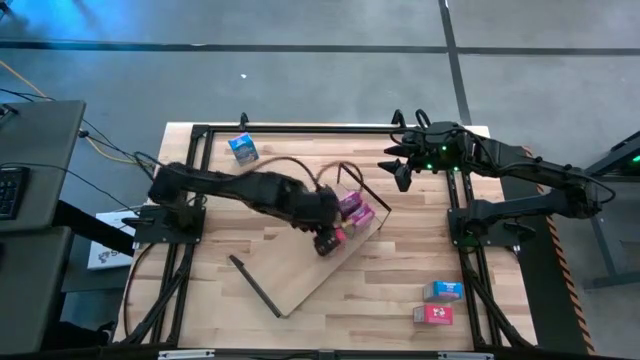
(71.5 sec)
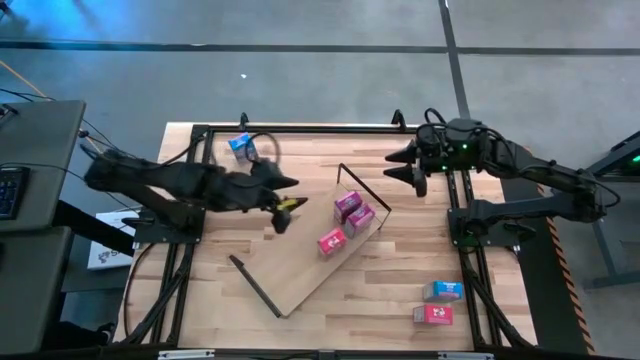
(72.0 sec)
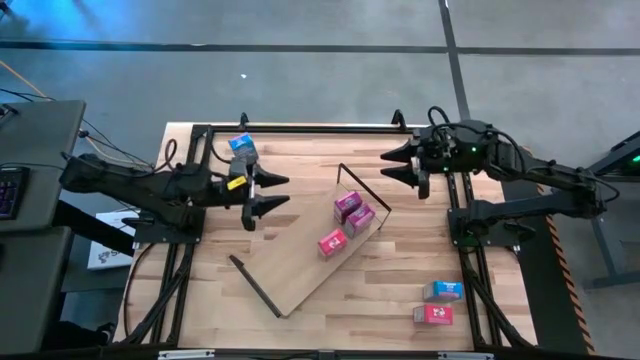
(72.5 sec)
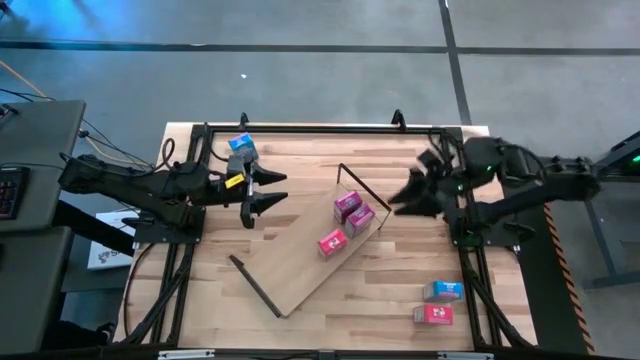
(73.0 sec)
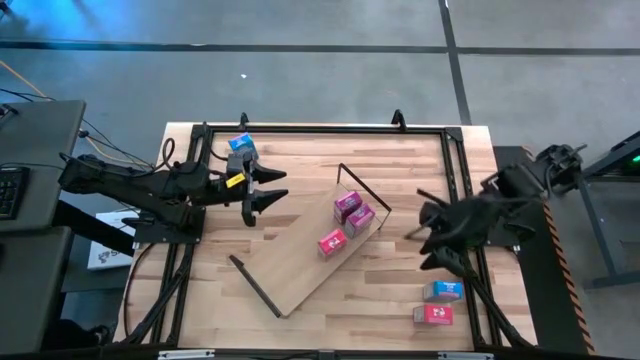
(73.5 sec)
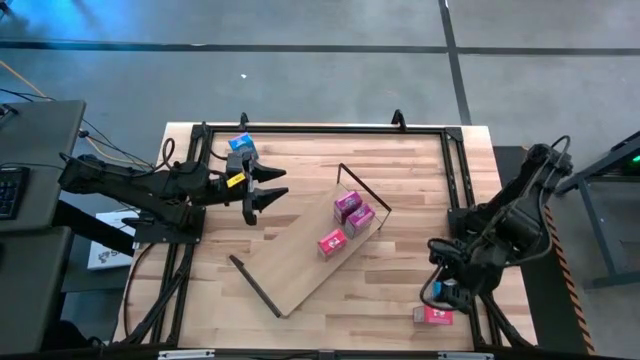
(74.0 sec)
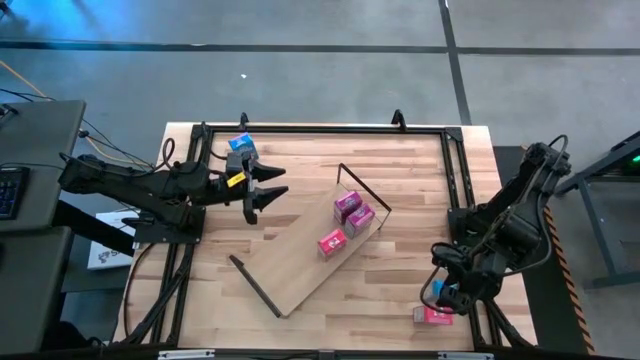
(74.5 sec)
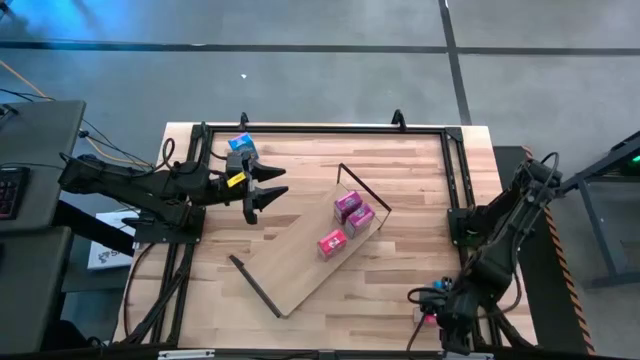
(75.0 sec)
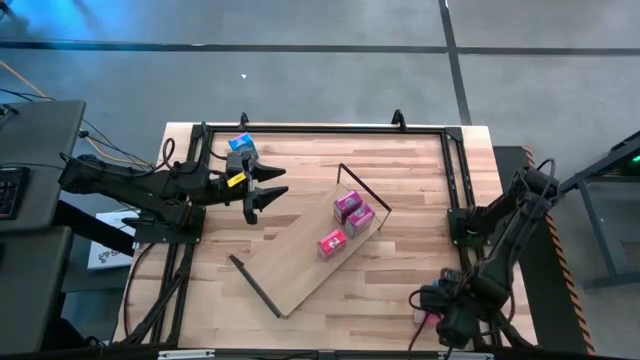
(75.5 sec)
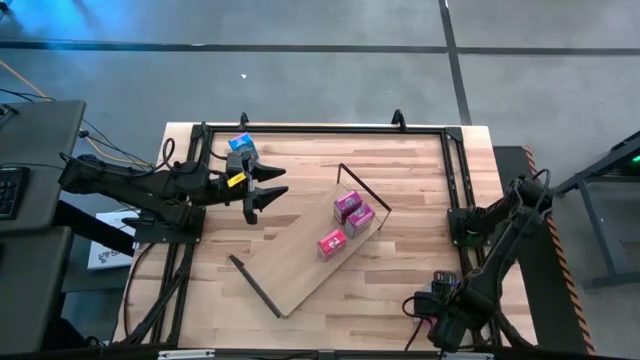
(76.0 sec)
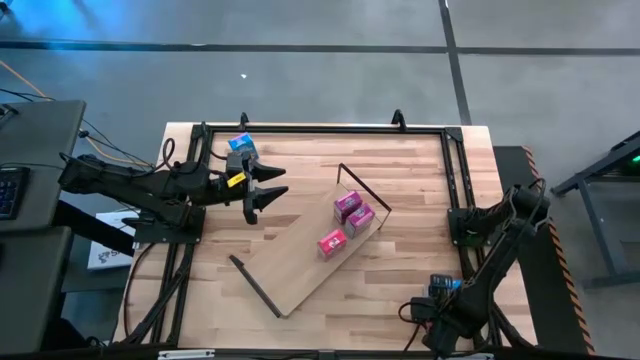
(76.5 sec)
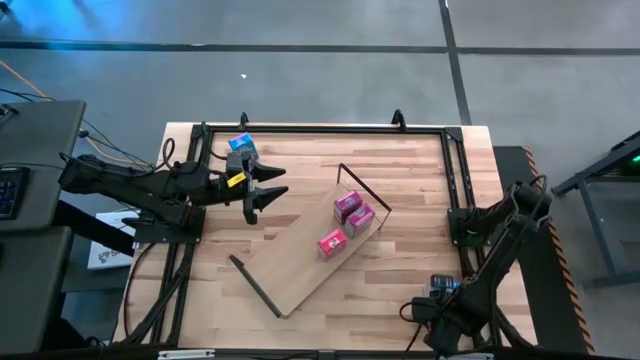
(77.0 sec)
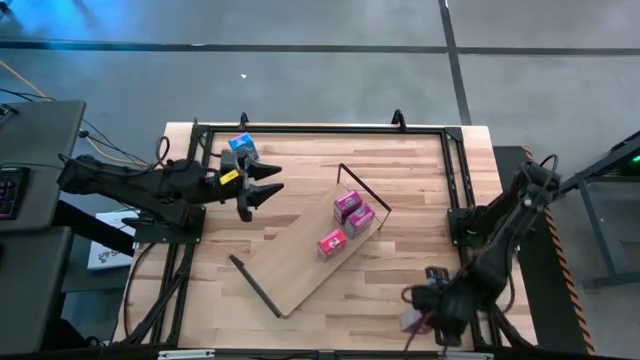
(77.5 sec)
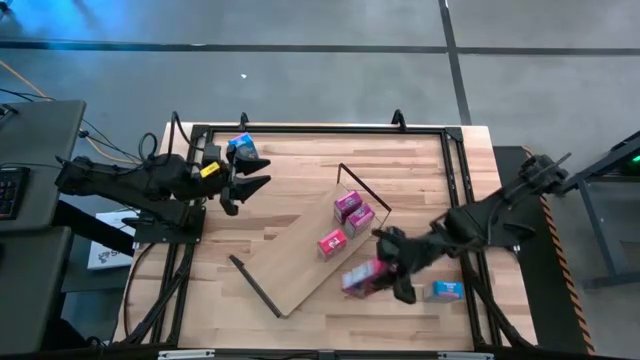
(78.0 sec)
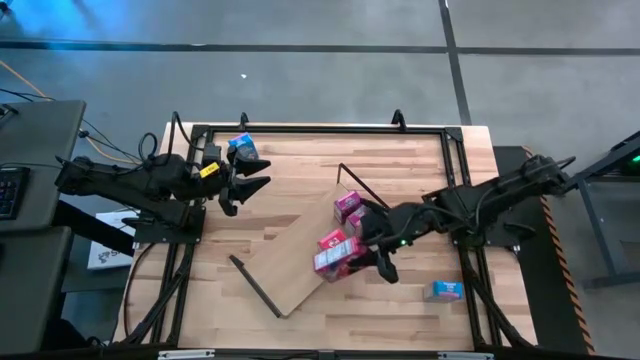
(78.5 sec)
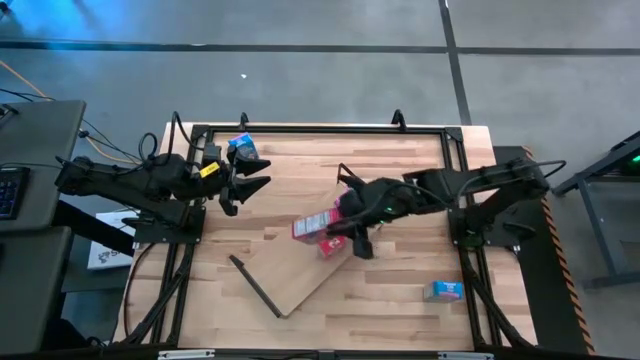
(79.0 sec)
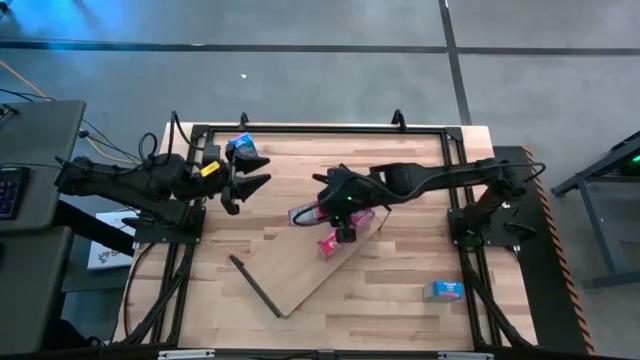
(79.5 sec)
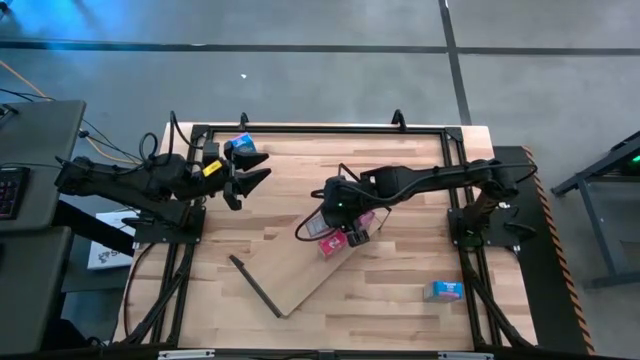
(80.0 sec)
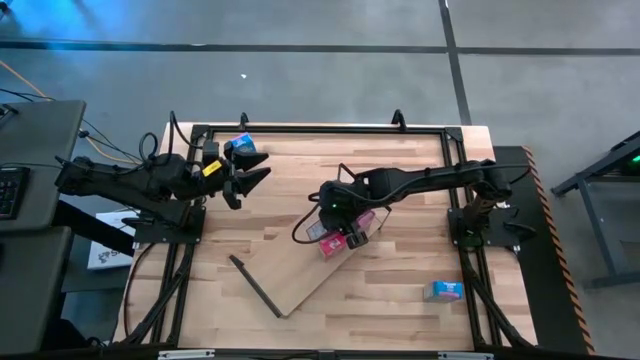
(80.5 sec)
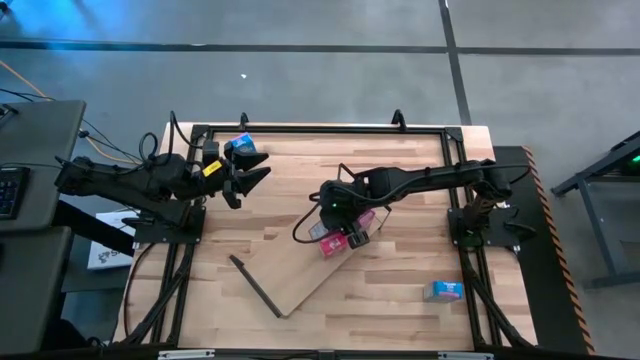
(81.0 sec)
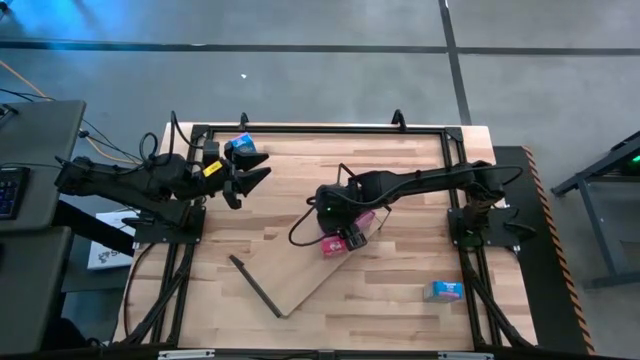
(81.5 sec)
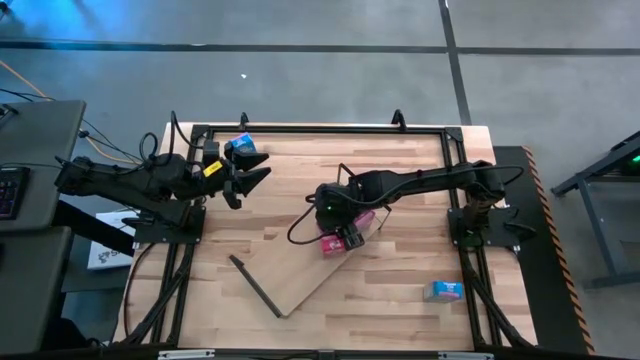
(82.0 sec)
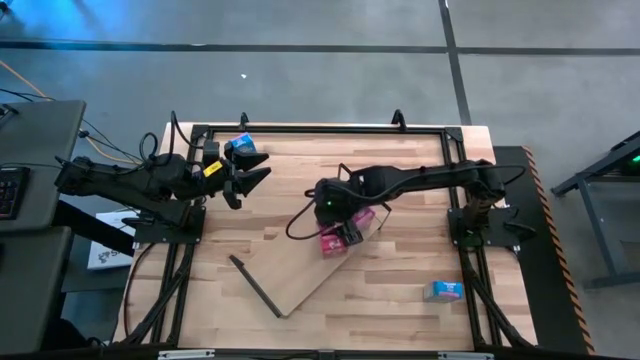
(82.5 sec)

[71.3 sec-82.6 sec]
Task: Stack cereal on shelf
Put the red cereal box on the shelf aligned with the other red cereal box

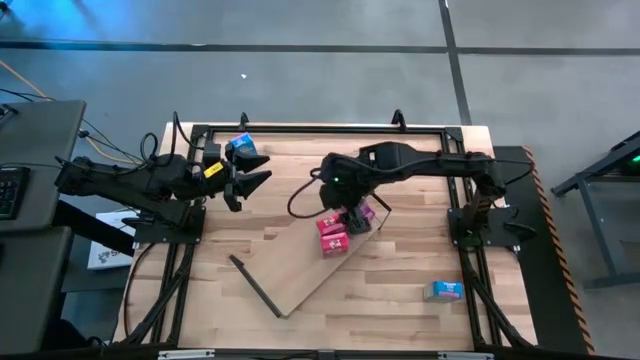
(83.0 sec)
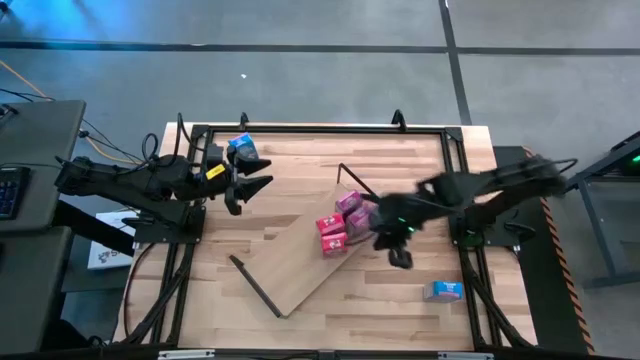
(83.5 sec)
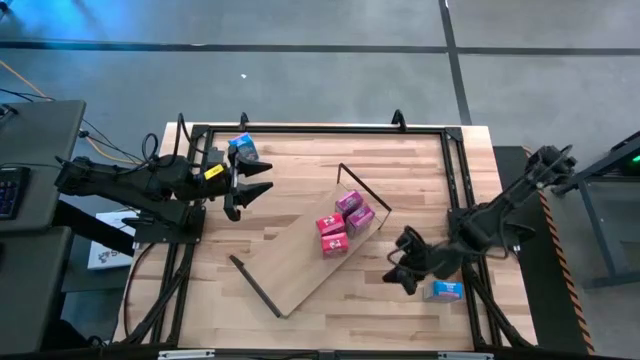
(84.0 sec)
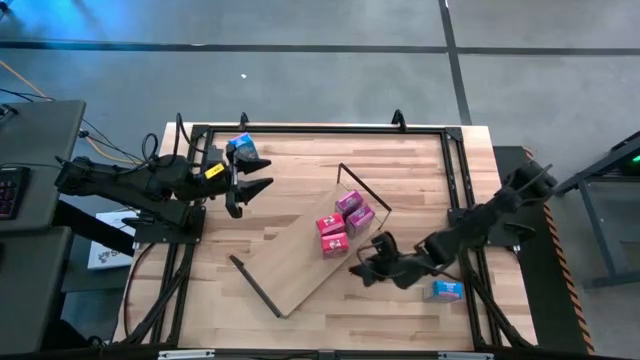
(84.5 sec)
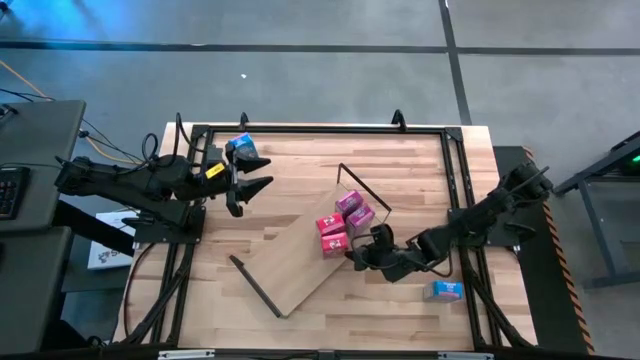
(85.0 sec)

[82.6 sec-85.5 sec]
Adjust the red cereal box on the shelf

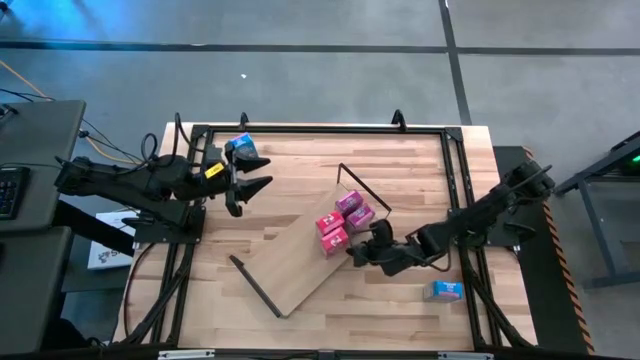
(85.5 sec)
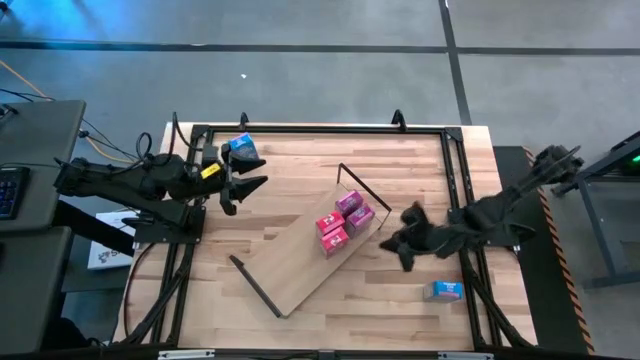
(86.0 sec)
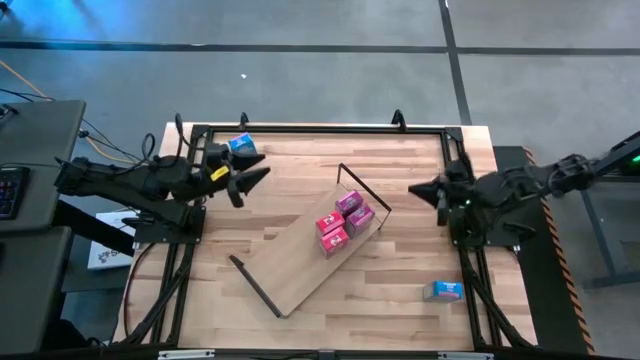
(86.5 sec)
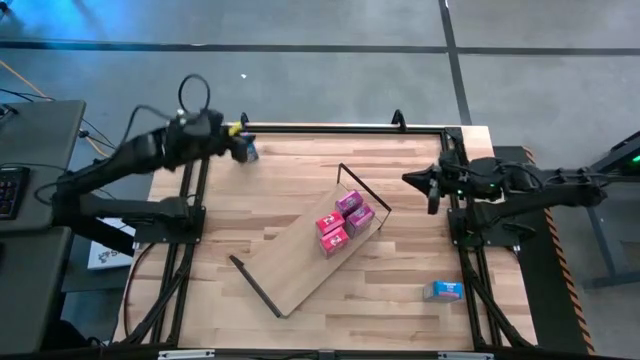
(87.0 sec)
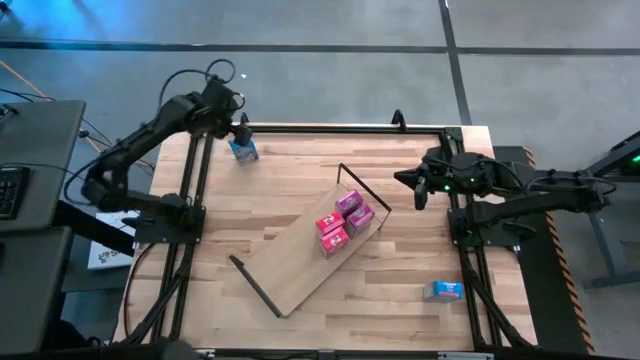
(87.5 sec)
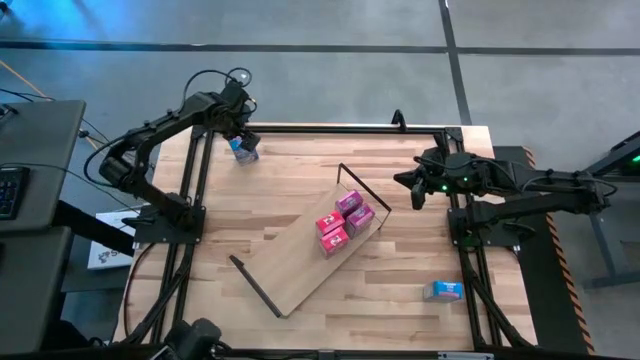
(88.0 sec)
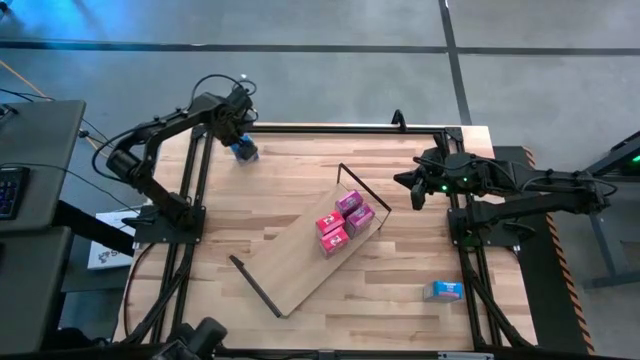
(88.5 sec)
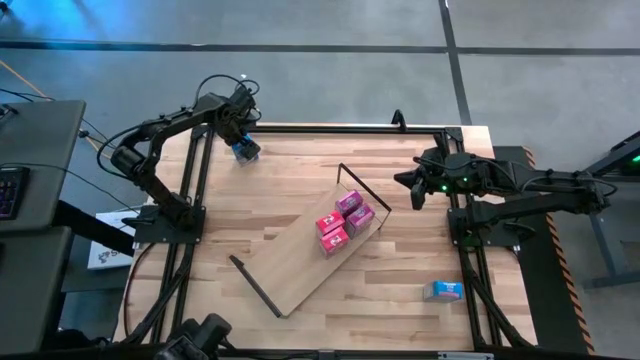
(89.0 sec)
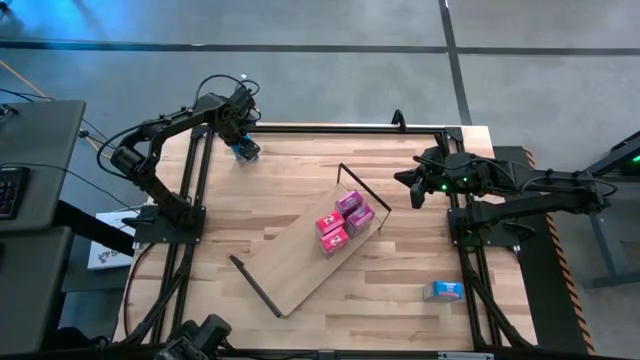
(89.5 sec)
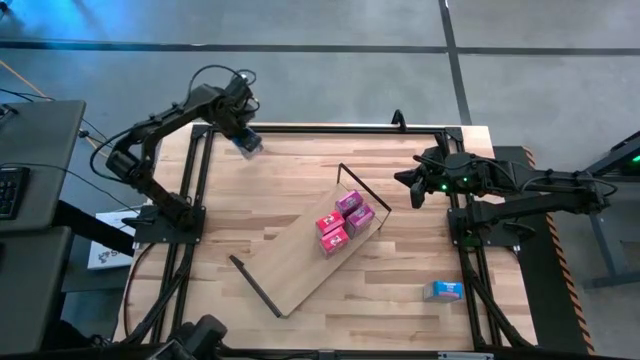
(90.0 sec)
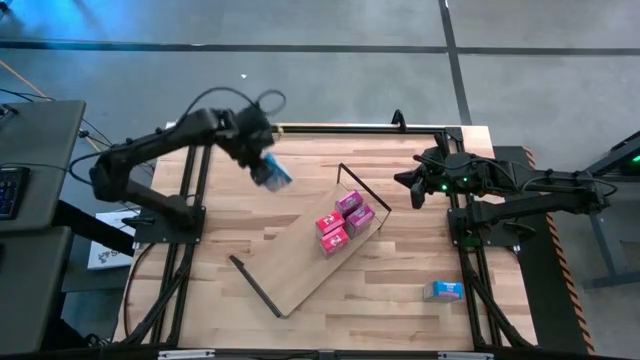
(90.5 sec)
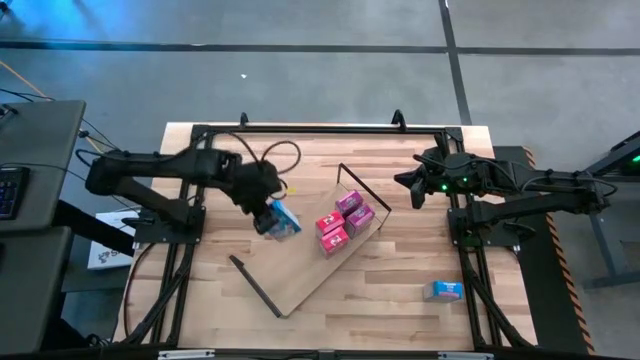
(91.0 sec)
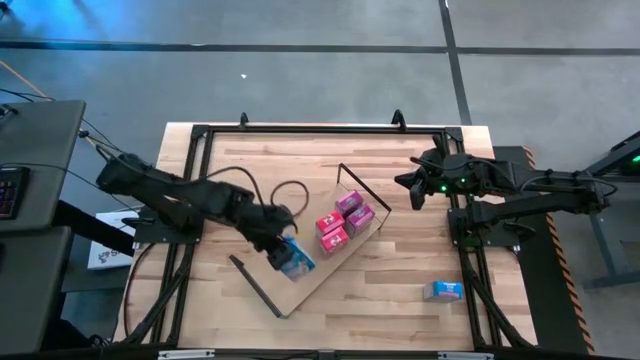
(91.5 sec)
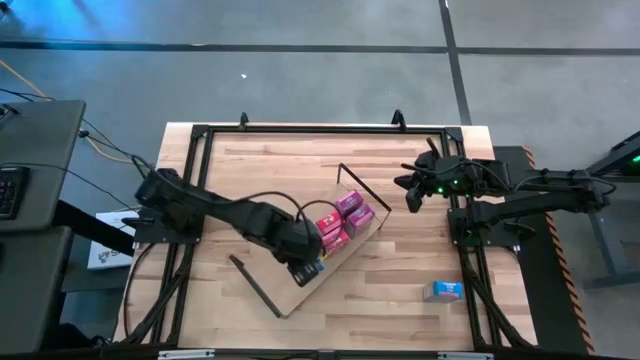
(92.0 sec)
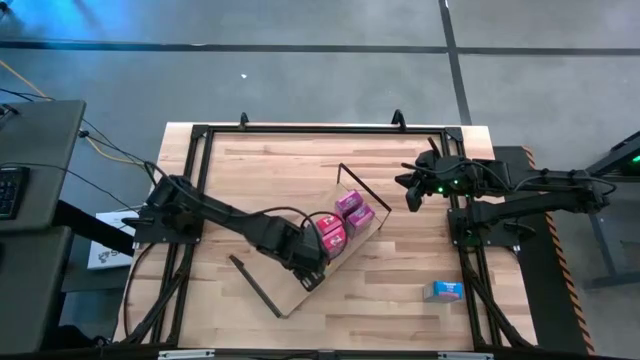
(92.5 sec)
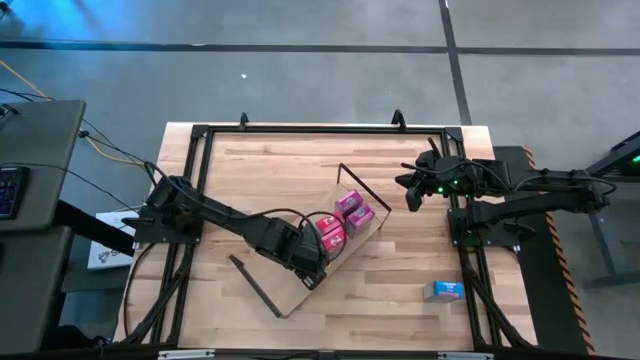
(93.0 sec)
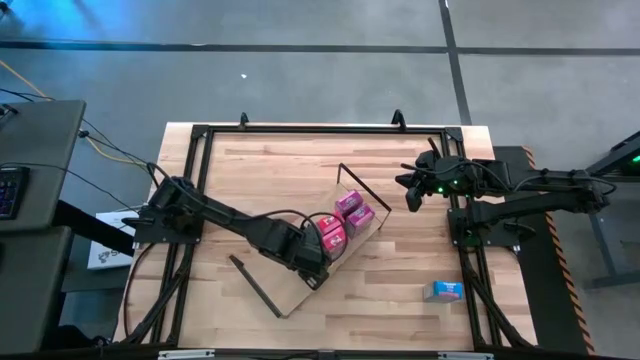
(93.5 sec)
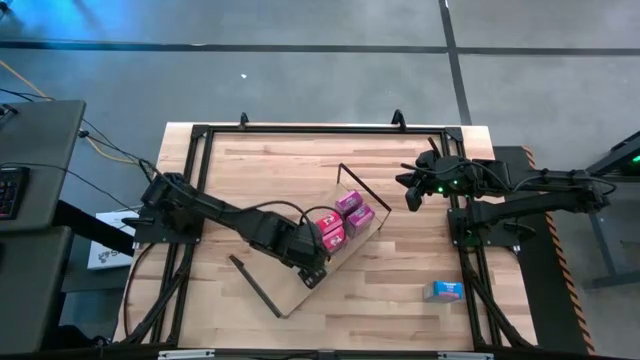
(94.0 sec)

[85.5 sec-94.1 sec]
Put the top blue cereal box on the shelf
